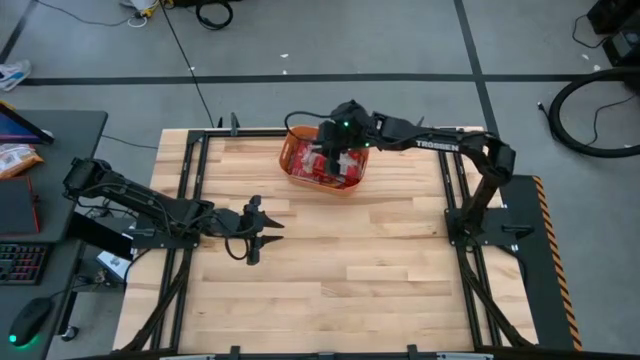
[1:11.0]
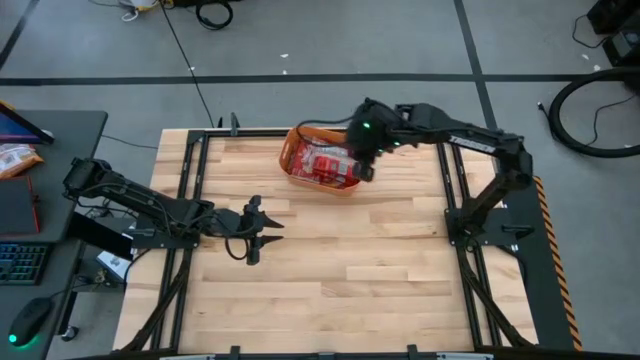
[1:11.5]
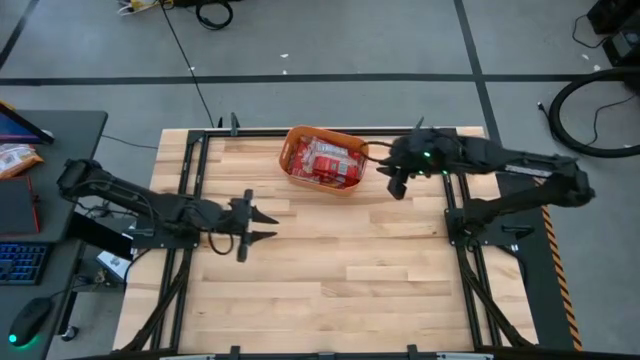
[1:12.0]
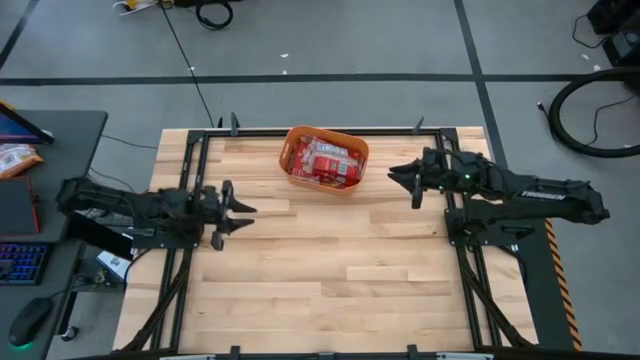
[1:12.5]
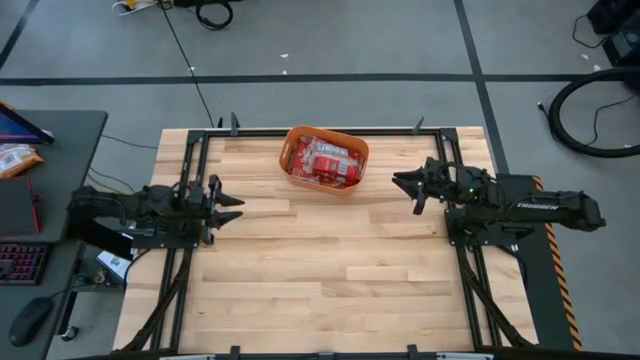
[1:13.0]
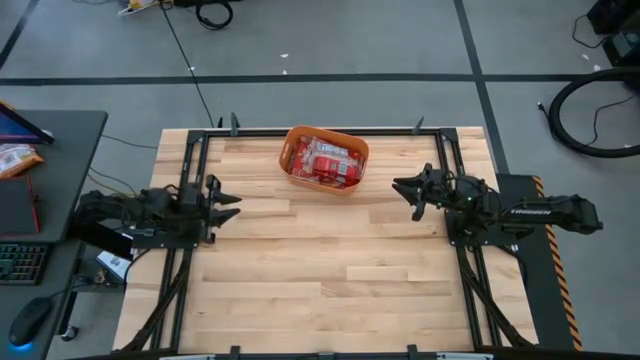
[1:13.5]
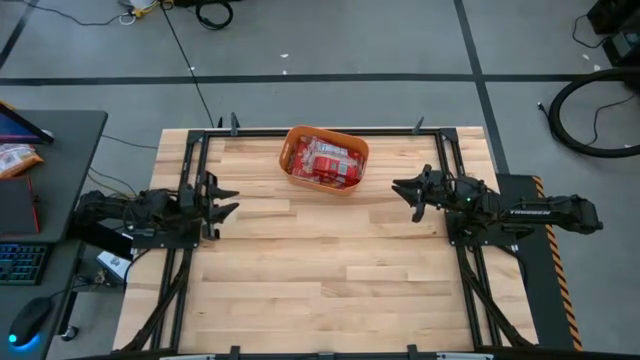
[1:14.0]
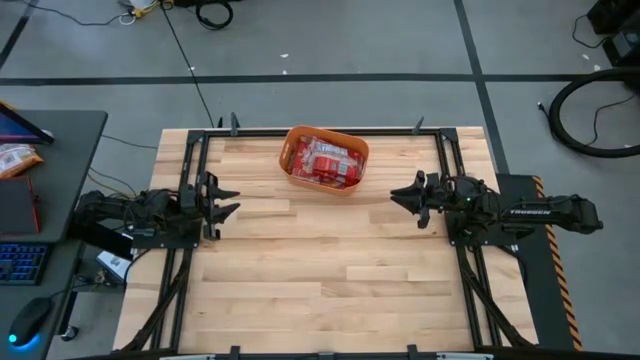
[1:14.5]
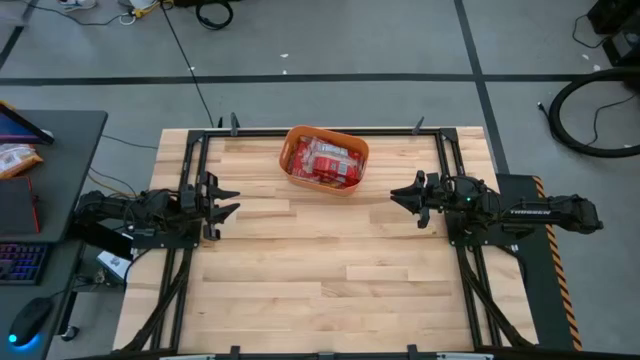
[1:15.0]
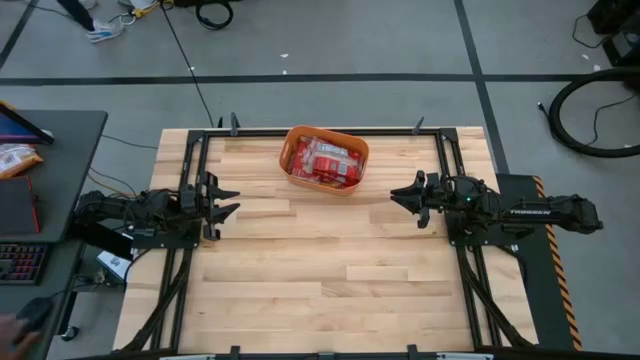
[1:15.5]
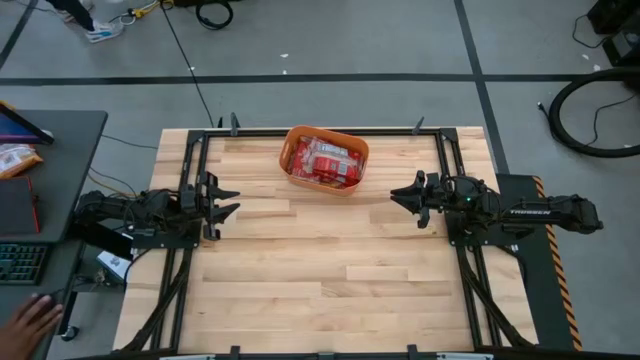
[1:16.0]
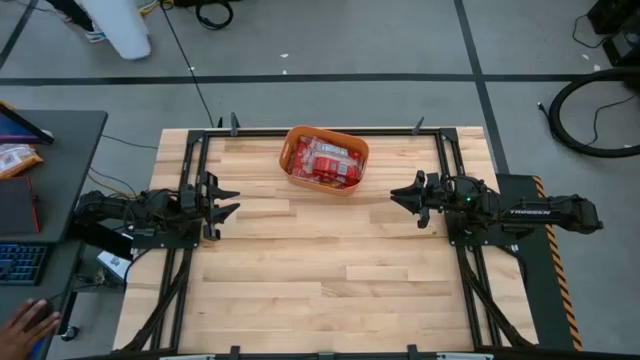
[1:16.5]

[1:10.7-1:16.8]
Task: Sort popcorn bags into baskets
Return to Home Position

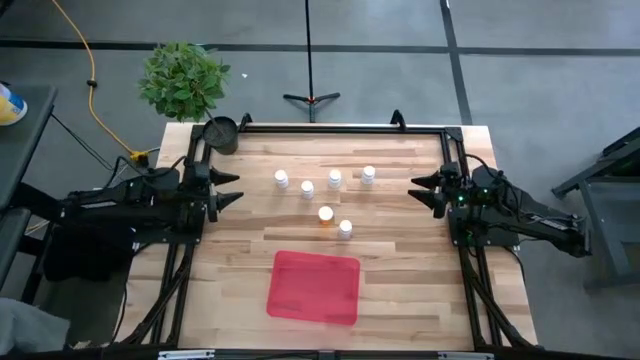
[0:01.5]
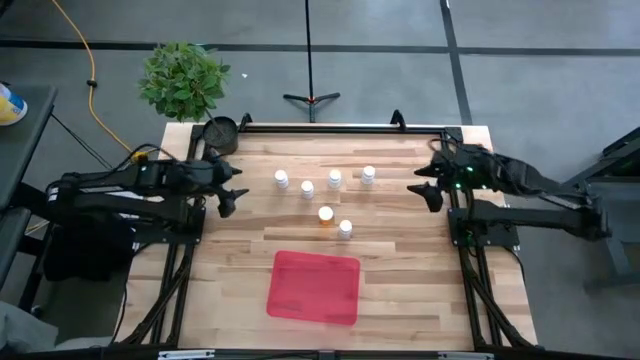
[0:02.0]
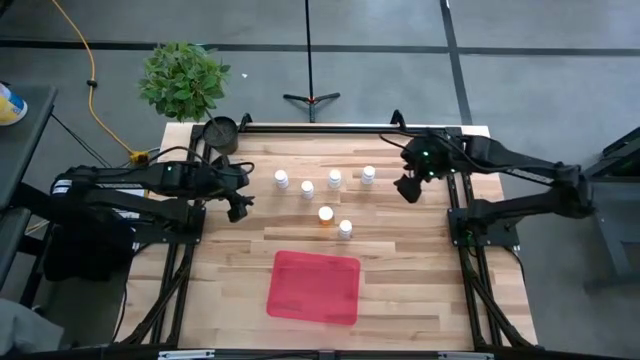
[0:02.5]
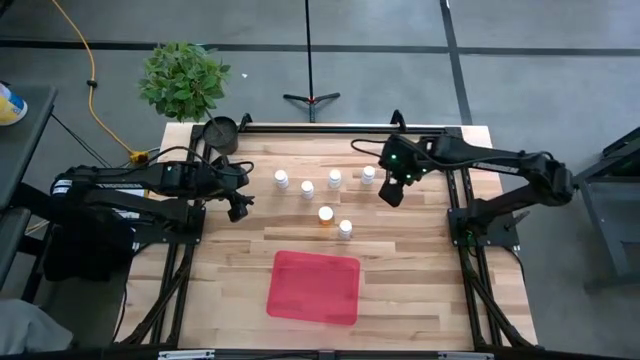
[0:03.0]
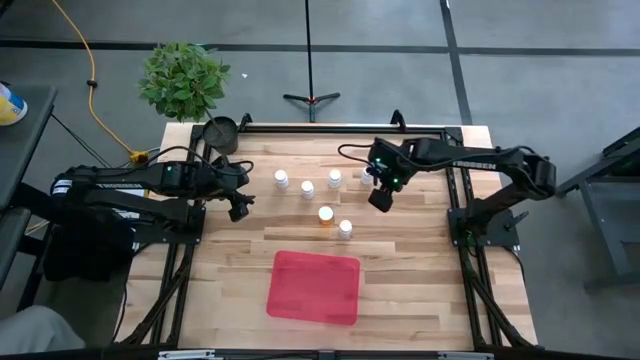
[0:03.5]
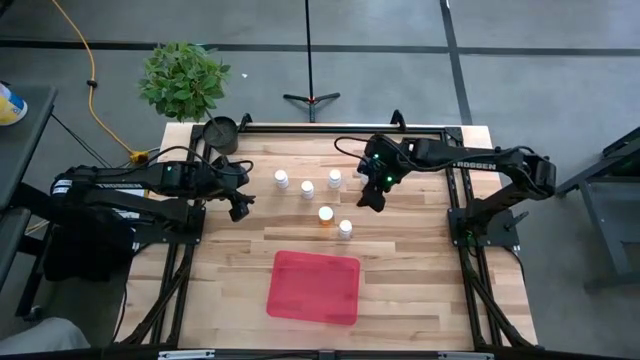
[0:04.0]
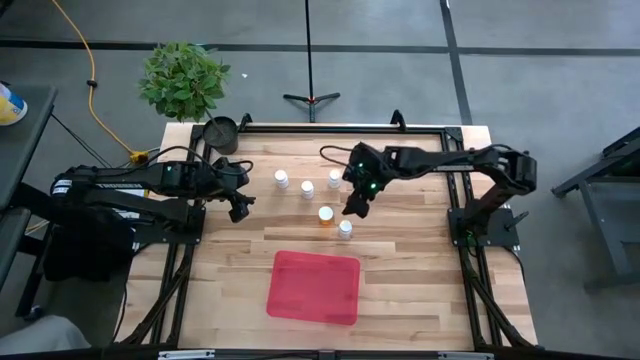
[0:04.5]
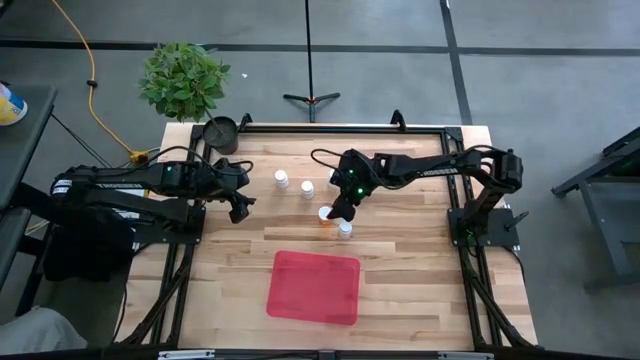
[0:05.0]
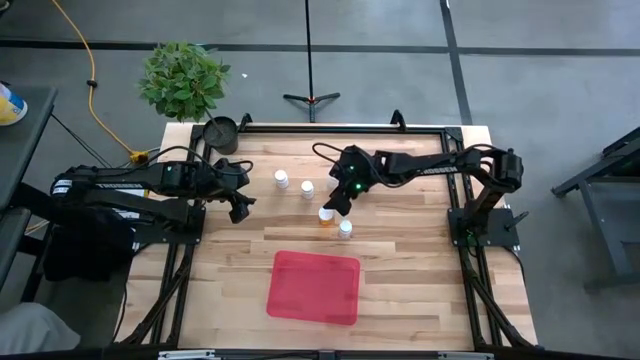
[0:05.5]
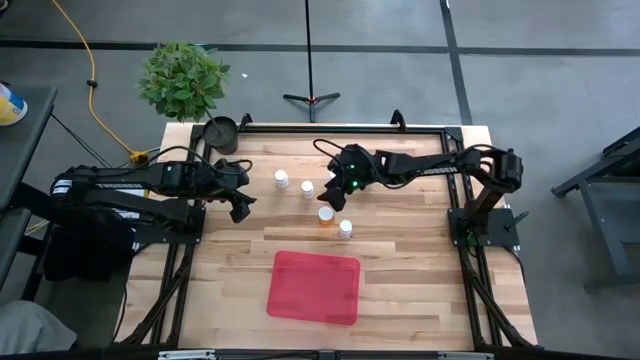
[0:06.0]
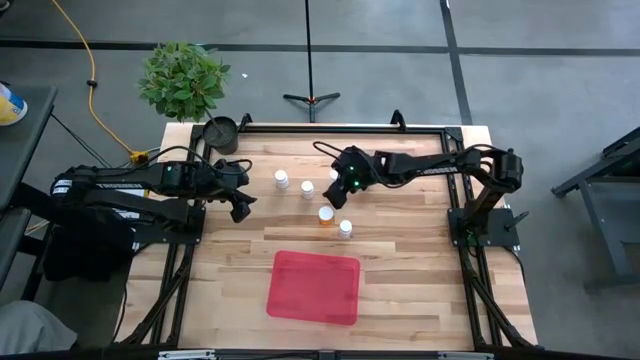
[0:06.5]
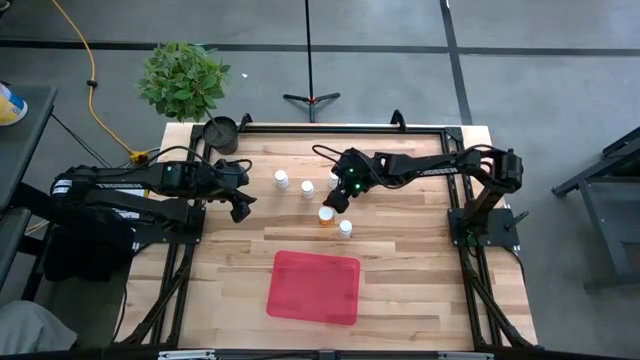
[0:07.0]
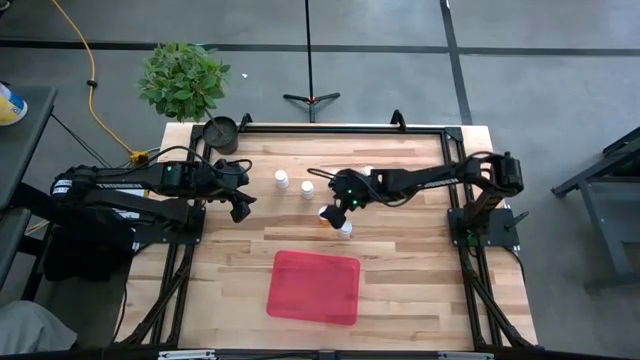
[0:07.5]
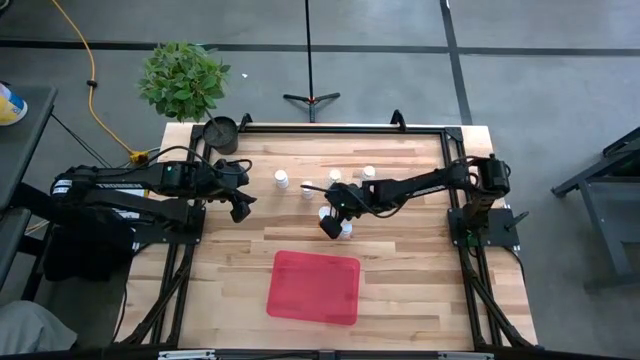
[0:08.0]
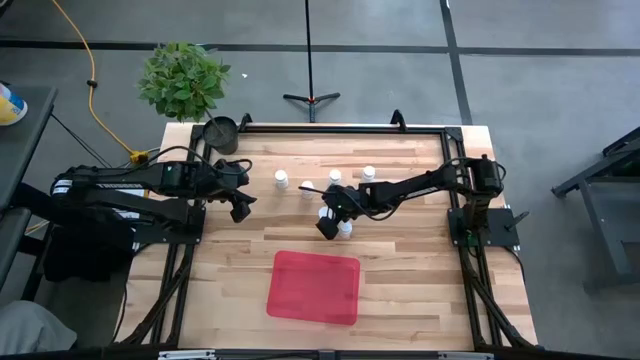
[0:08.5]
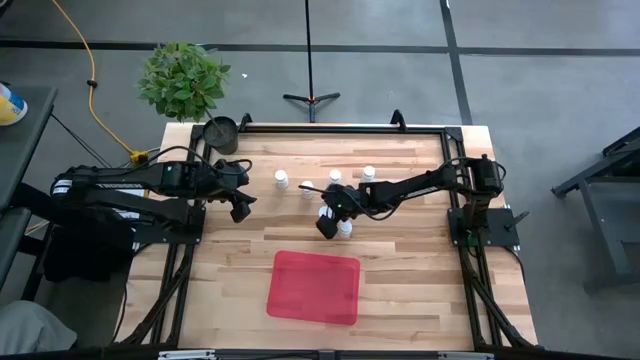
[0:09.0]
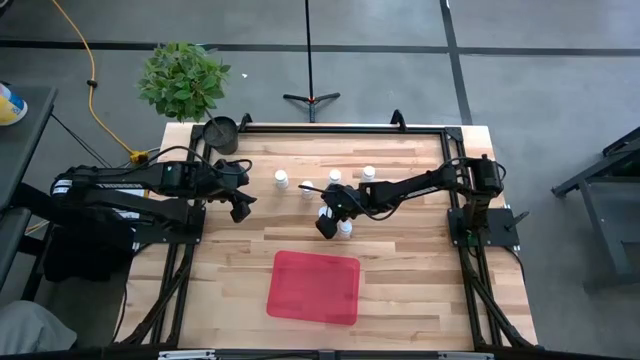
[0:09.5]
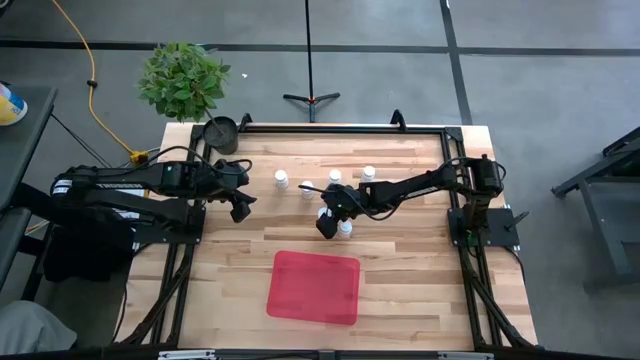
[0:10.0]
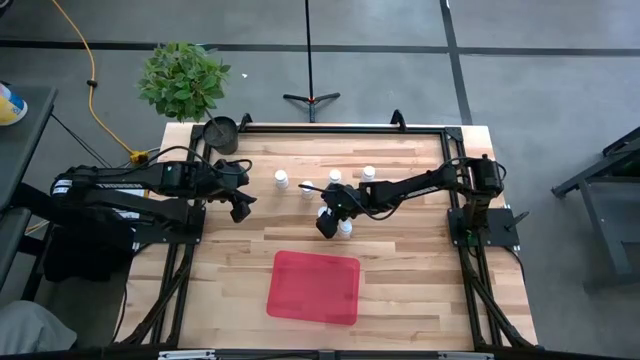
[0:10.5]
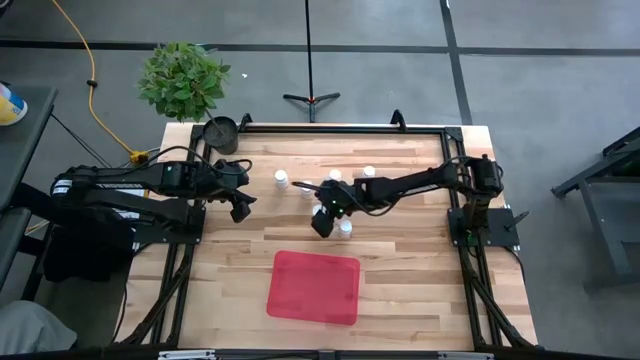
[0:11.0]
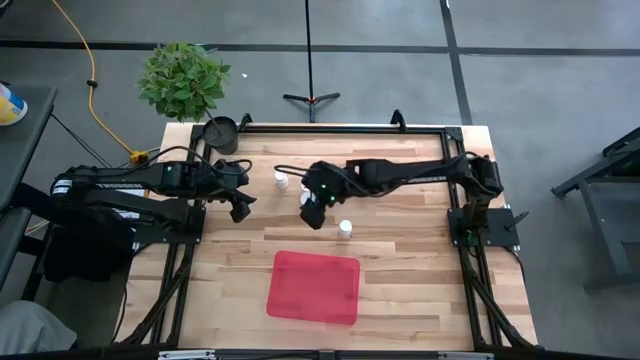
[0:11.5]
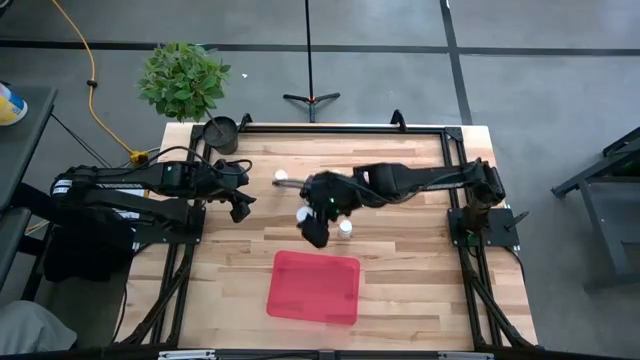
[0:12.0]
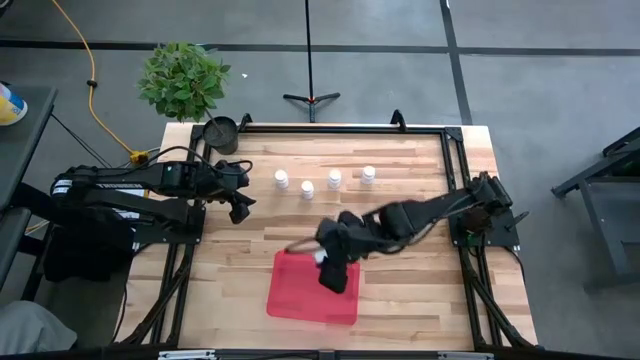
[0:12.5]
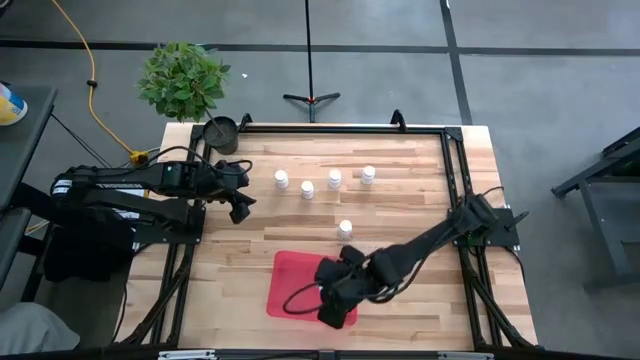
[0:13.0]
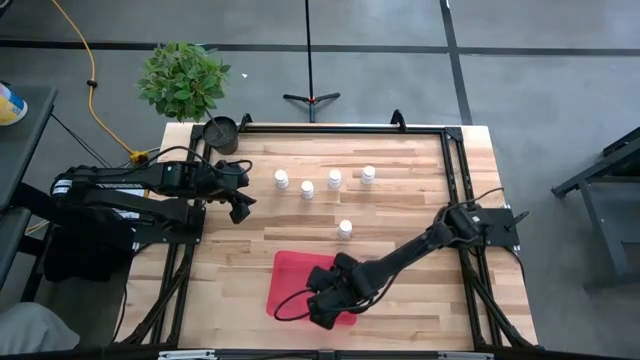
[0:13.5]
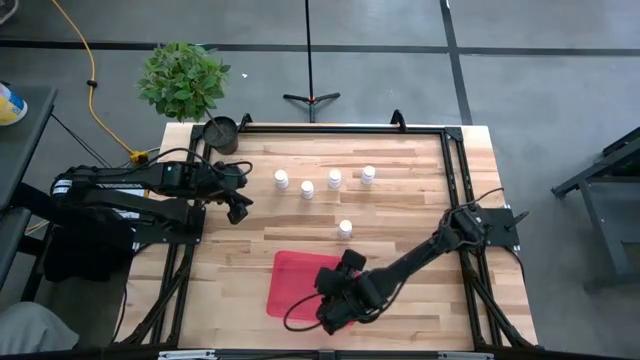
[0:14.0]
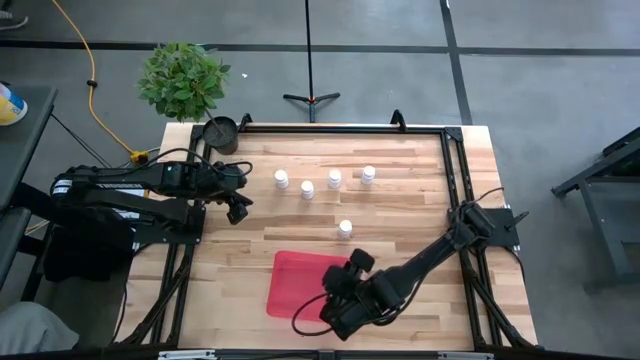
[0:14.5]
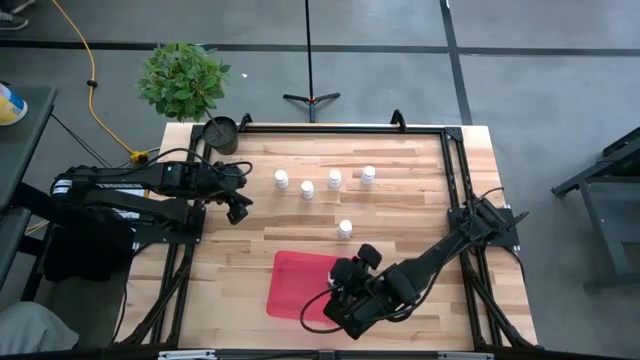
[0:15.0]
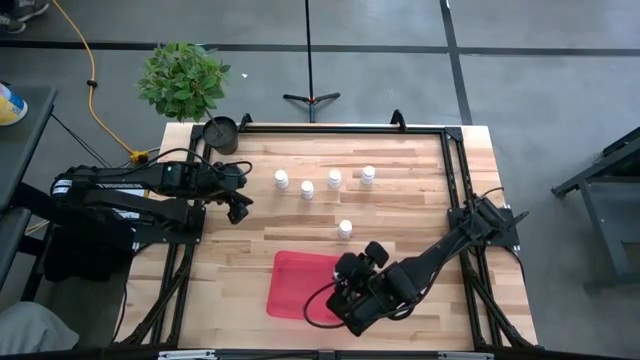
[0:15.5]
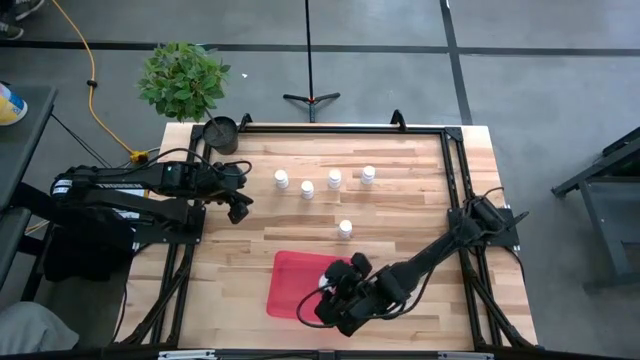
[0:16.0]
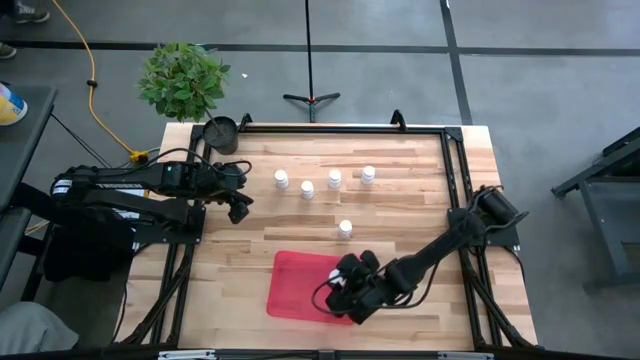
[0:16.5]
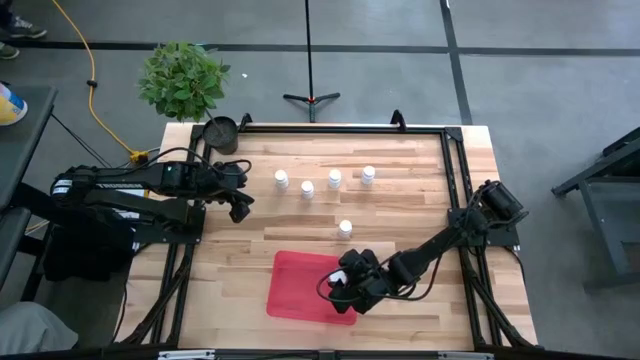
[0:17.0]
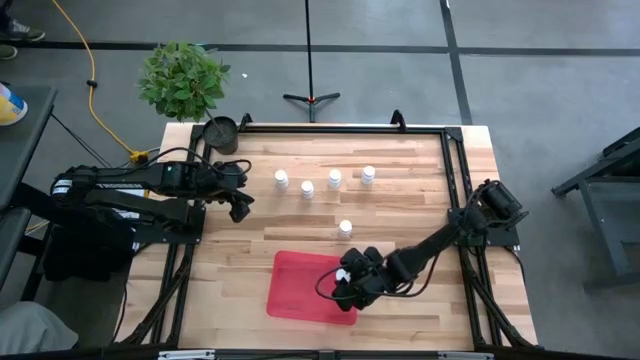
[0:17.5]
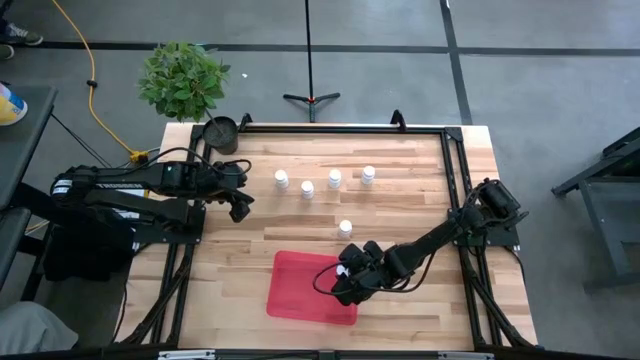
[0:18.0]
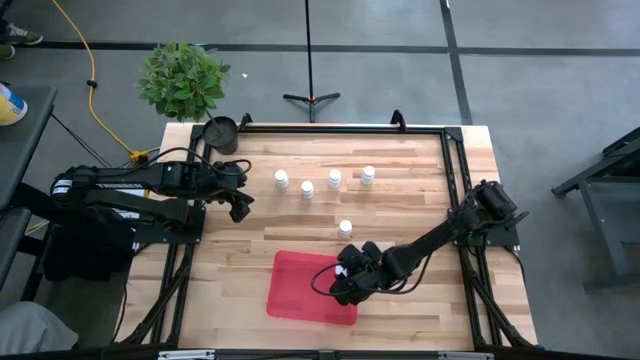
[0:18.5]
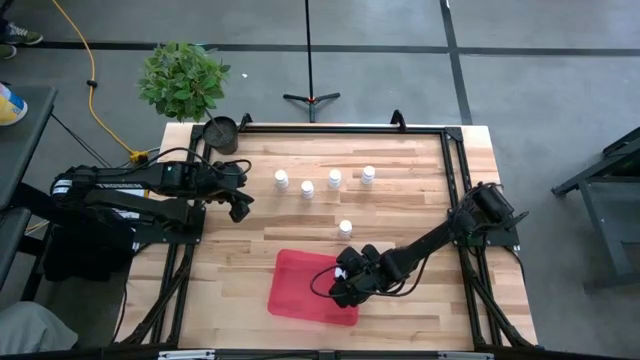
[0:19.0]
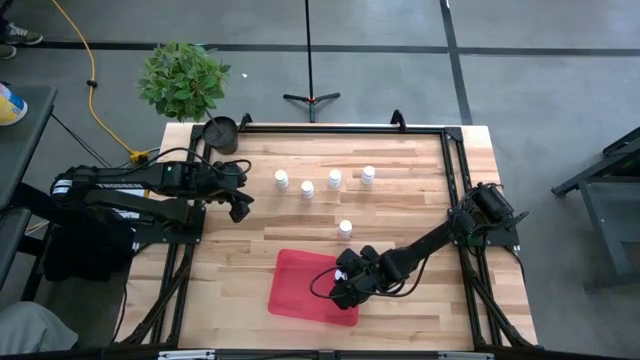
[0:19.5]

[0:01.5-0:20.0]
Task: Pick and place pill bottles into a basket
Put the white and orange medicine bottle into the red container
